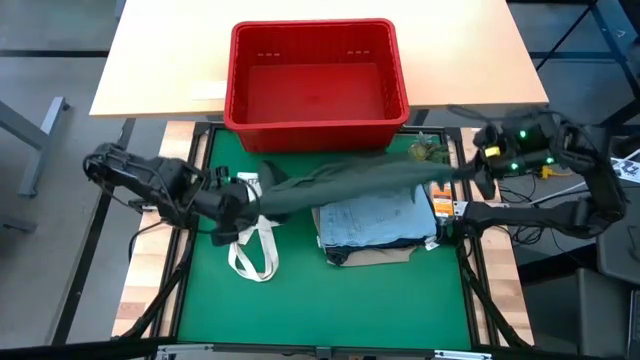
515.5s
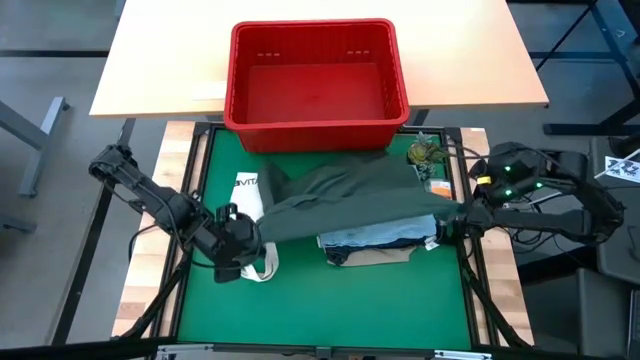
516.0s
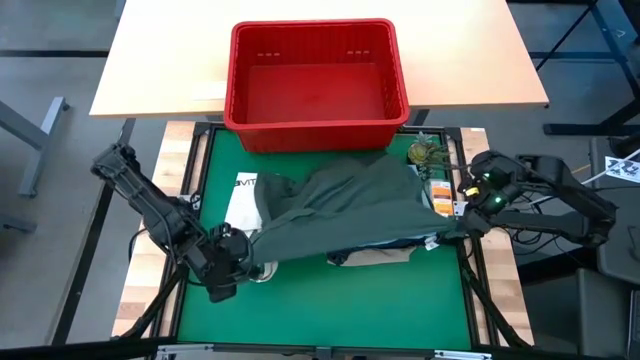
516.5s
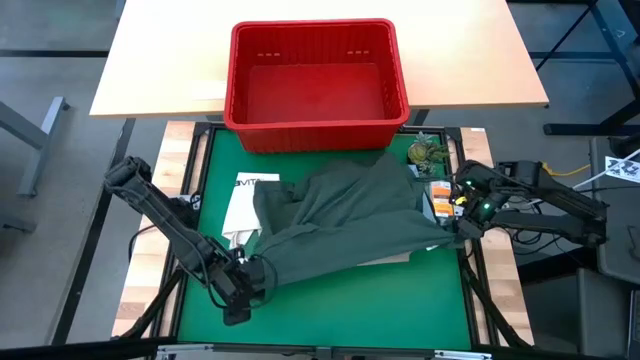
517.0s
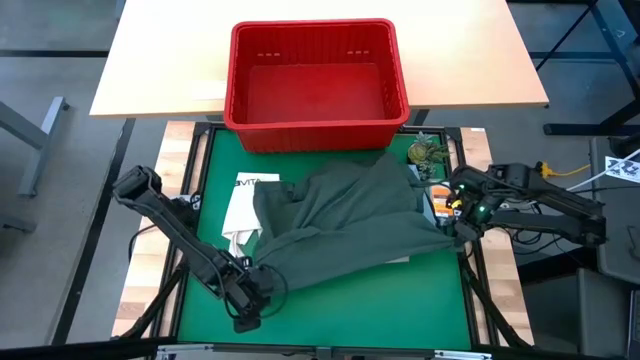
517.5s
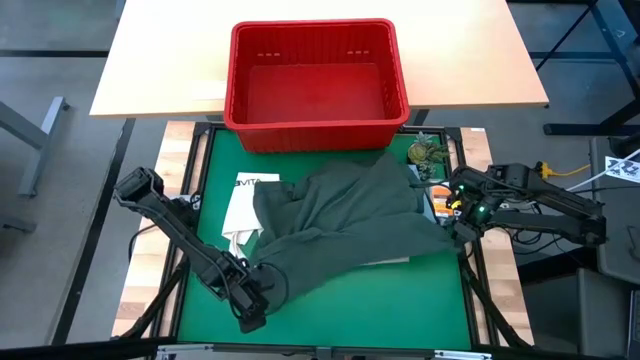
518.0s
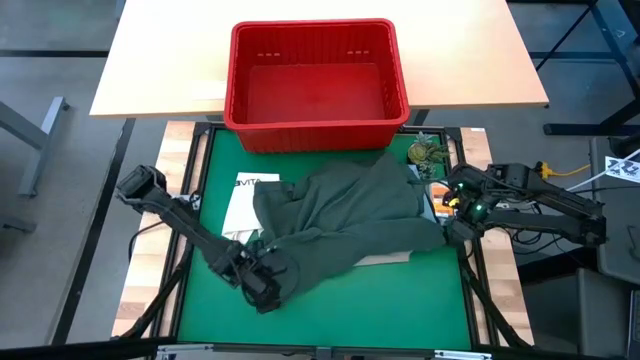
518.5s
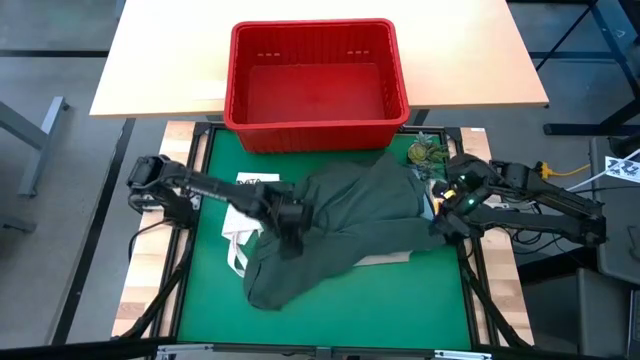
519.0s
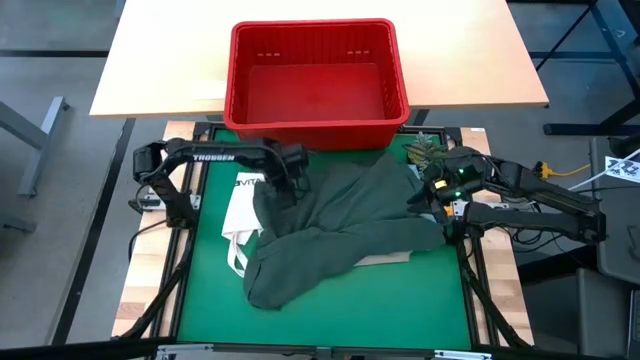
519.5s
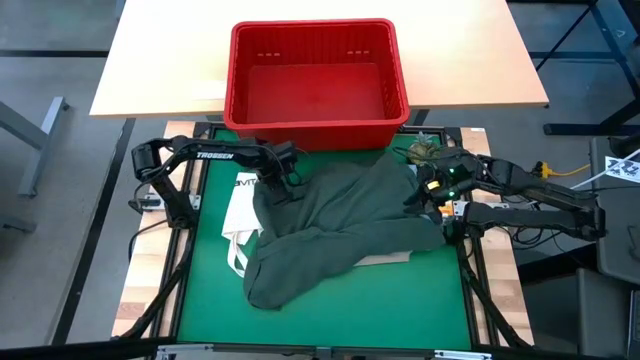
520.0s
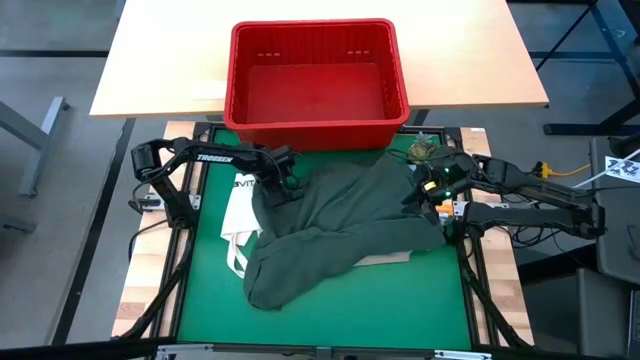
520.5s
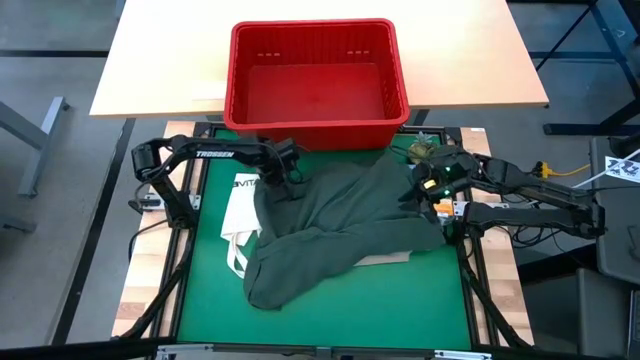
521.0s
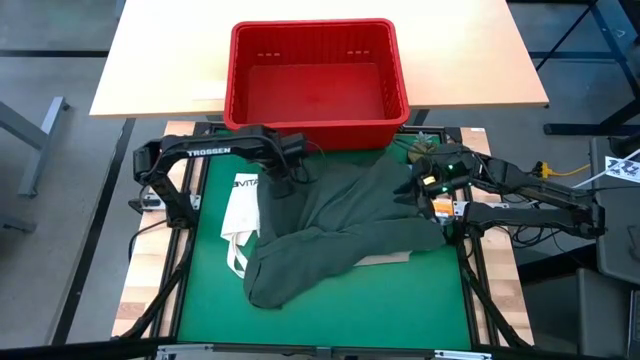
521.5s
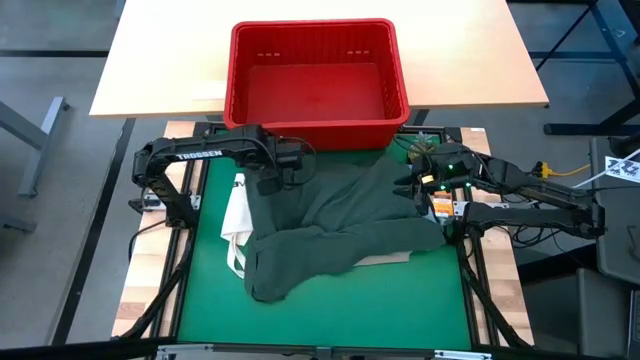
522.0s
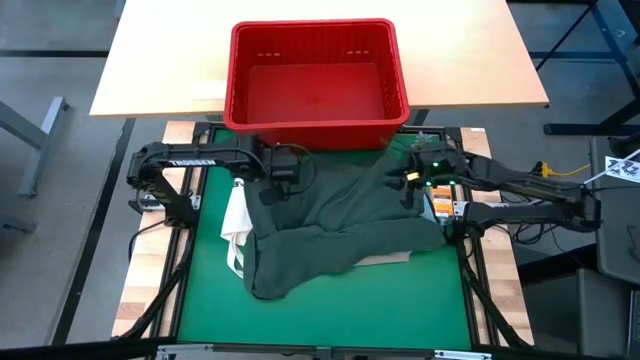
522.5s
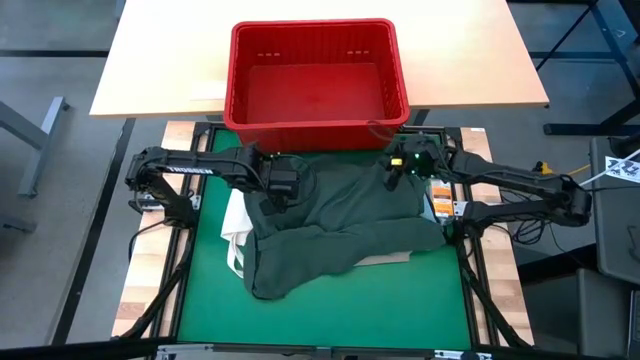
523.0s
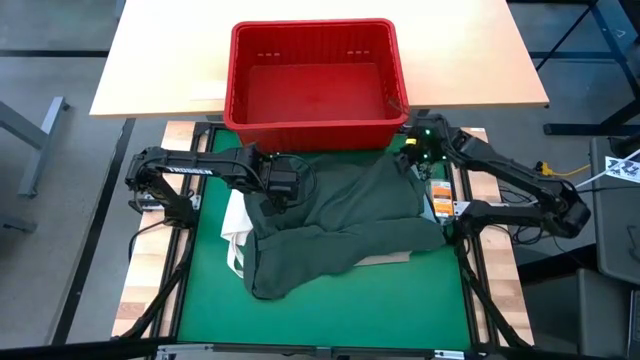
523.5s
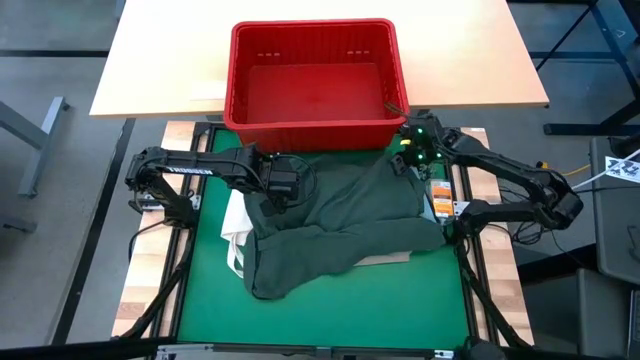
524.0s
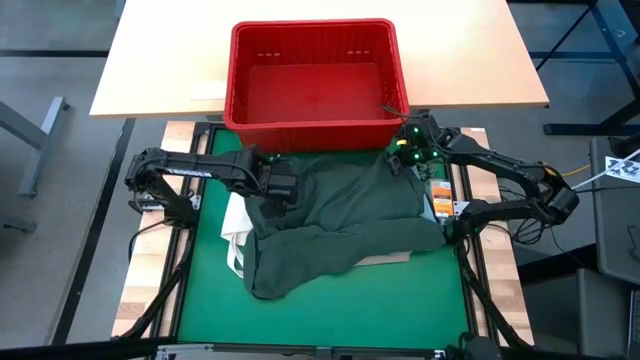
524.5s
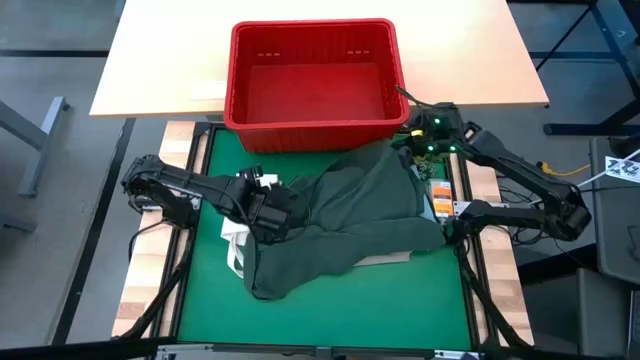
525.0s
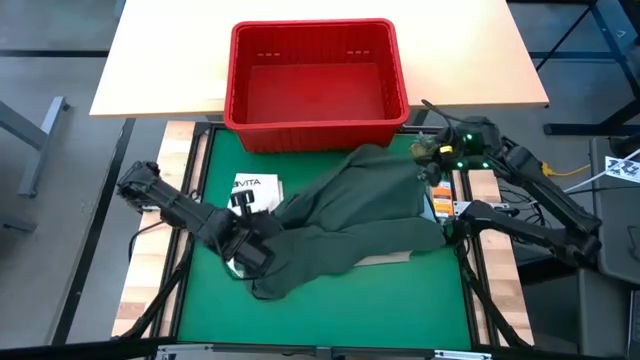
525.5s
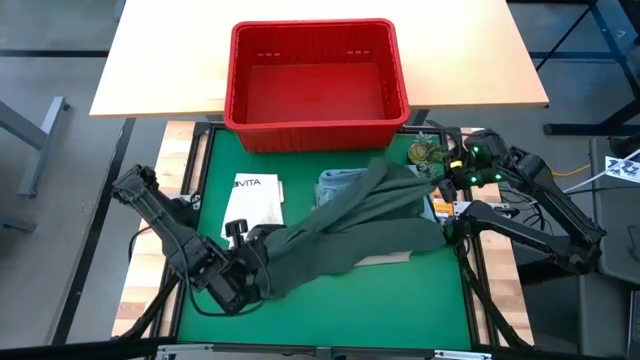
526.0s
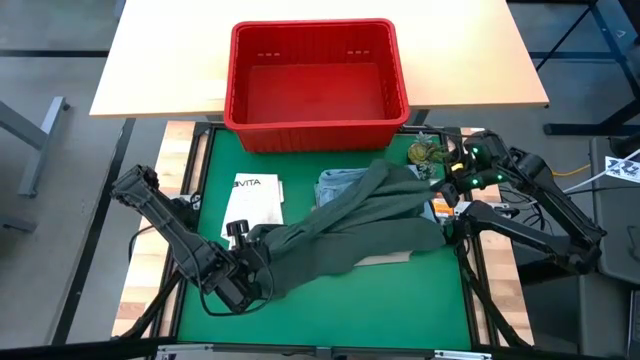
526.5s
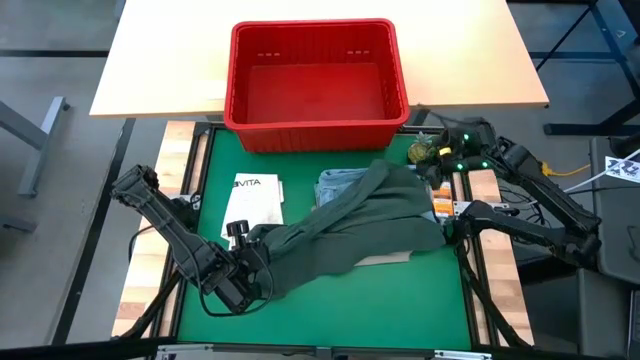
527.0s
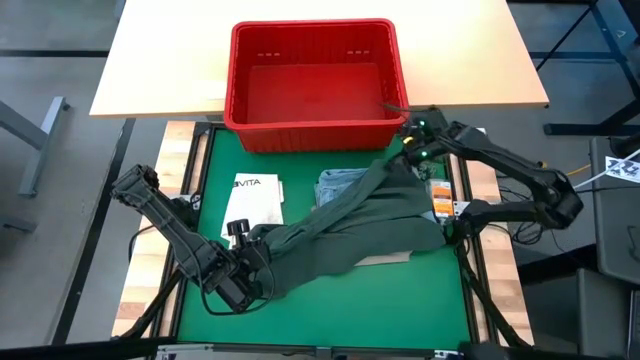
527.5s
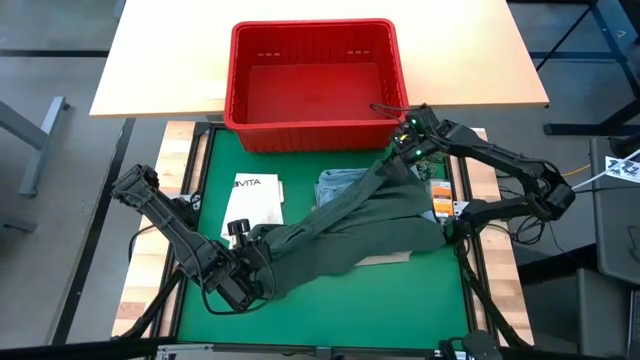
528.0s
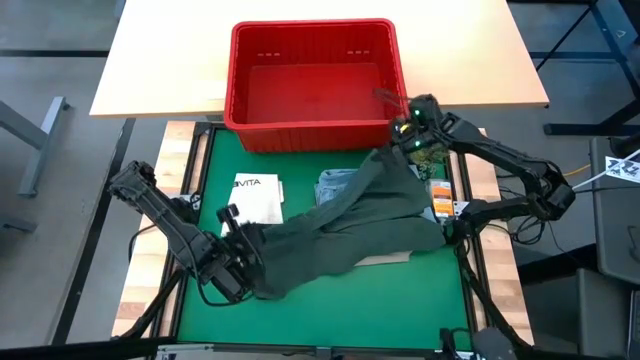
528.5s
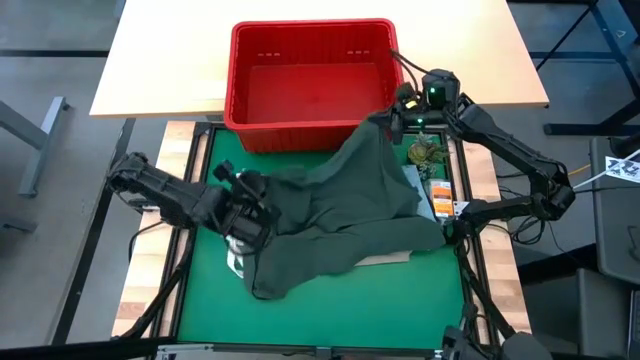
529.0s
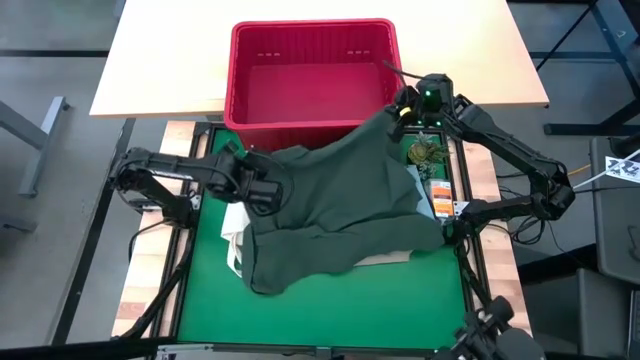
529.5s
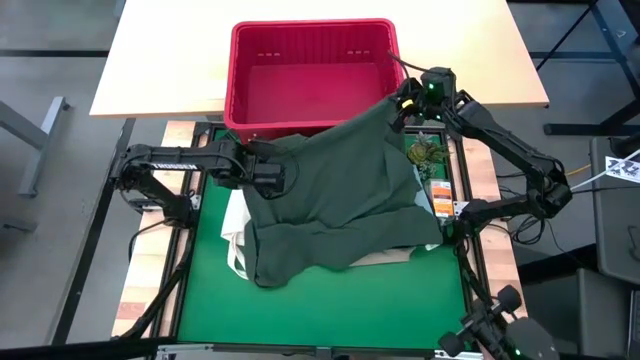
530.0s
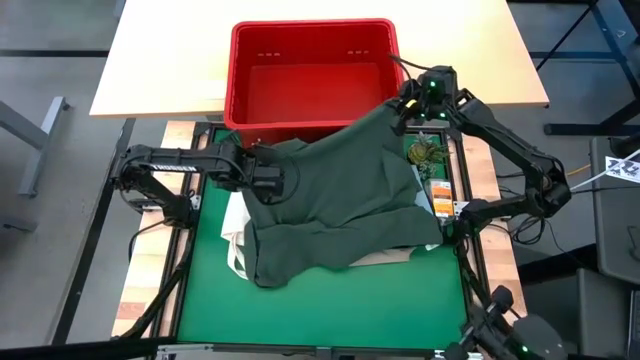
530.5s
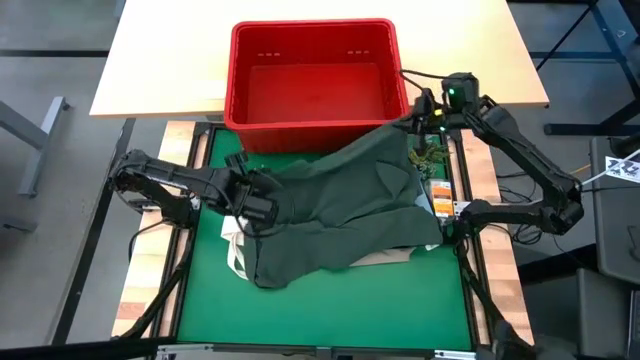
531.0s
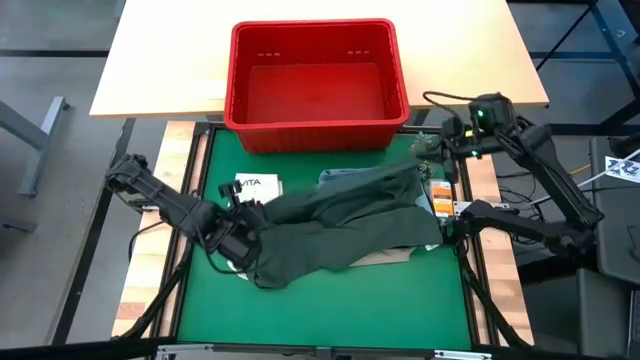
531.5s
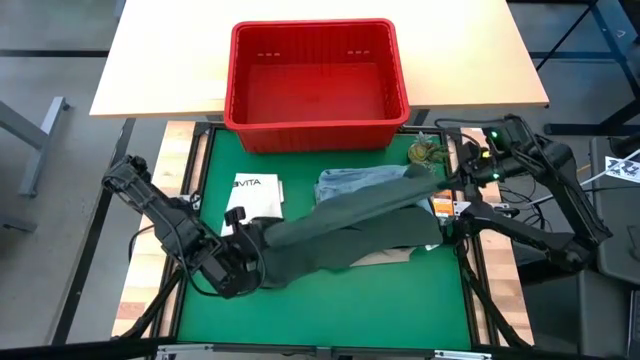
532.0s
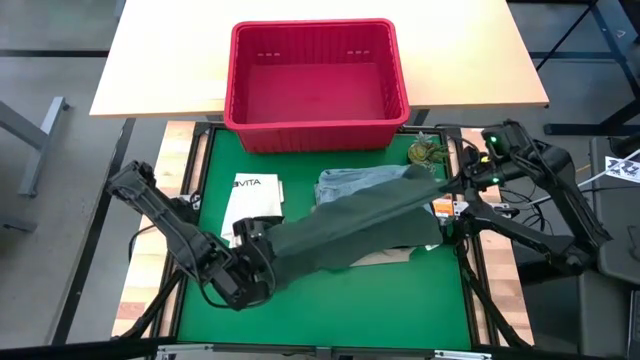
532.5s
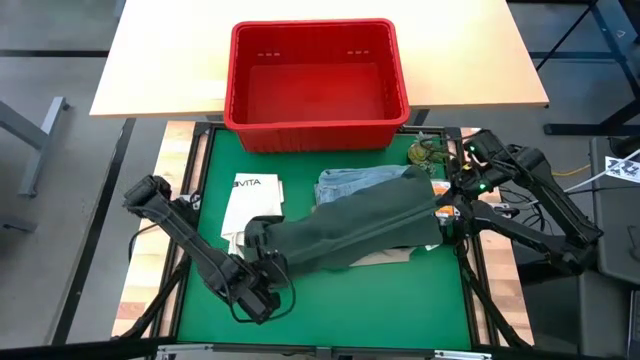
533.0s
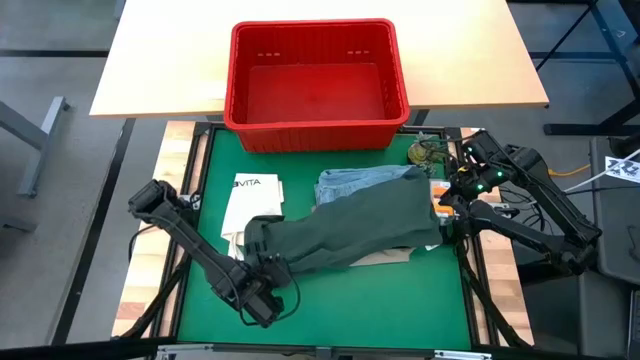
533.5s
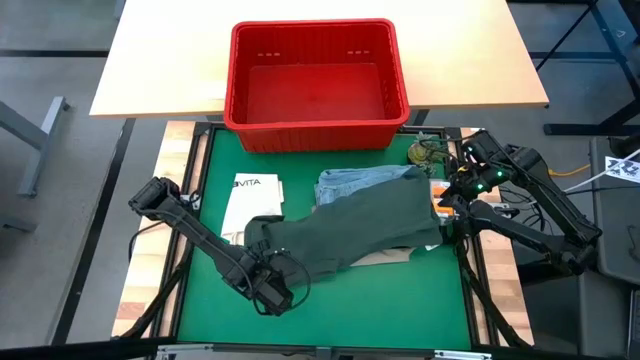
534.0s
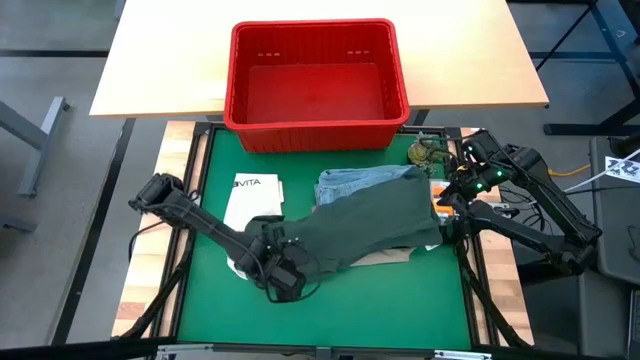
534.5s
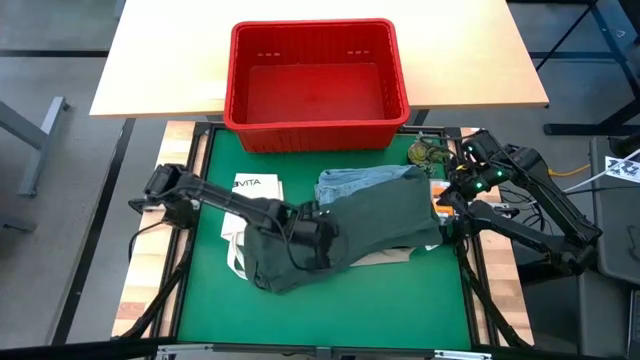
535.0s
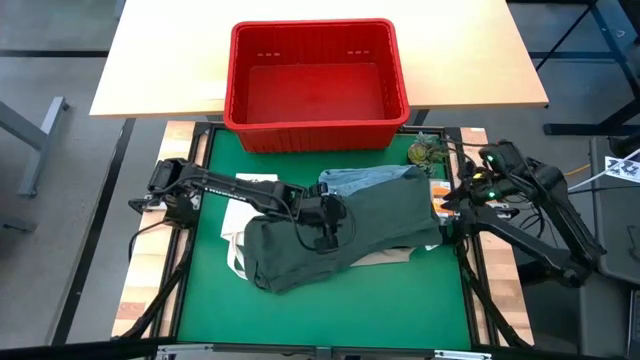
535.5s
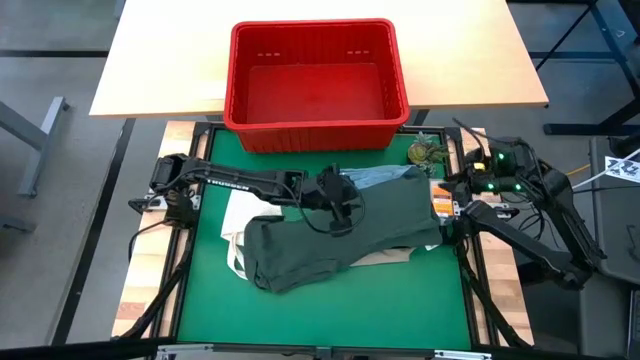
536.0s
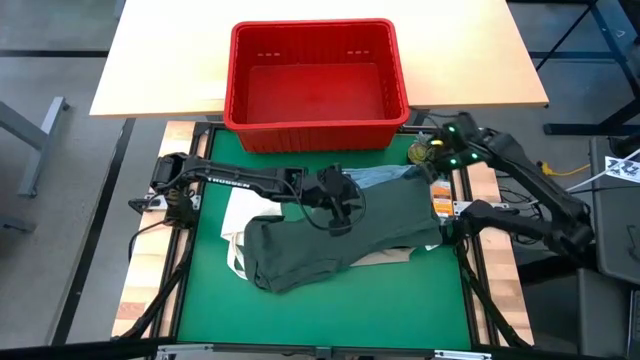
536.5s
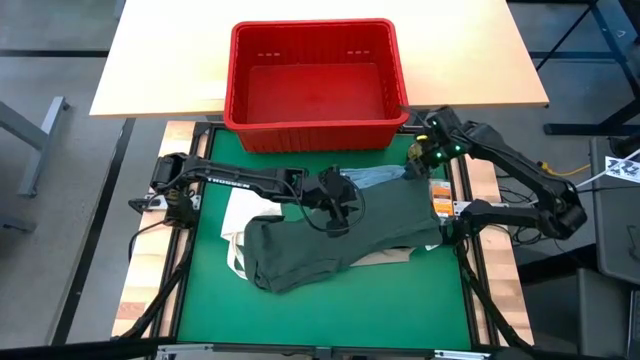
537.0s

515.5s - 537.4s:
Task: Fold Laundry from Bin
Fold the green shirt
